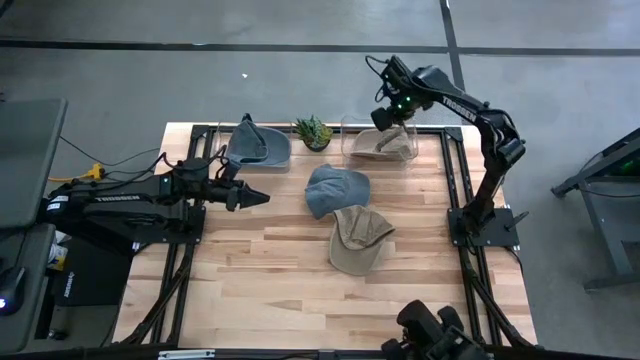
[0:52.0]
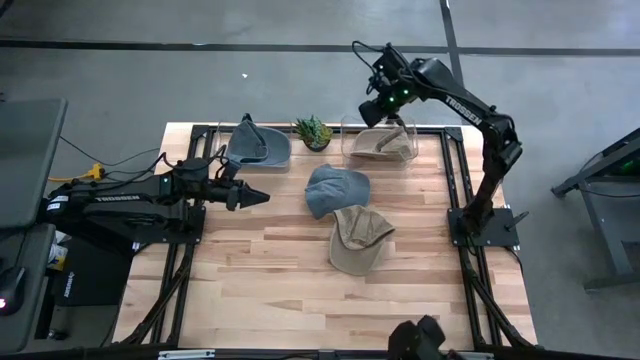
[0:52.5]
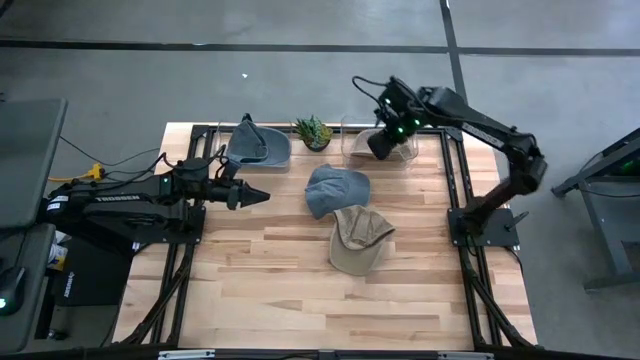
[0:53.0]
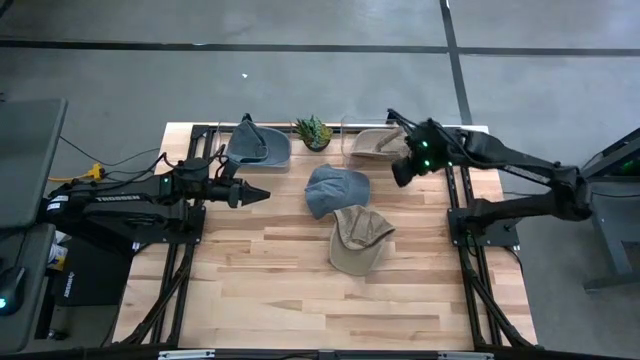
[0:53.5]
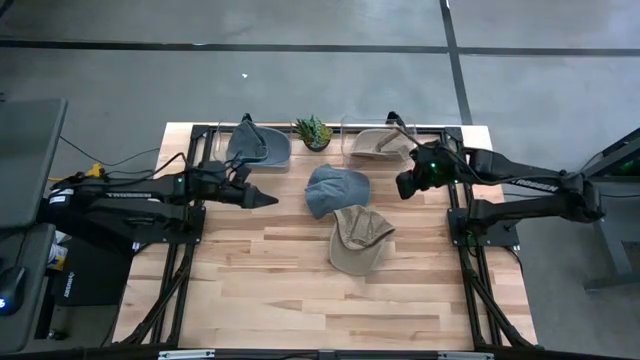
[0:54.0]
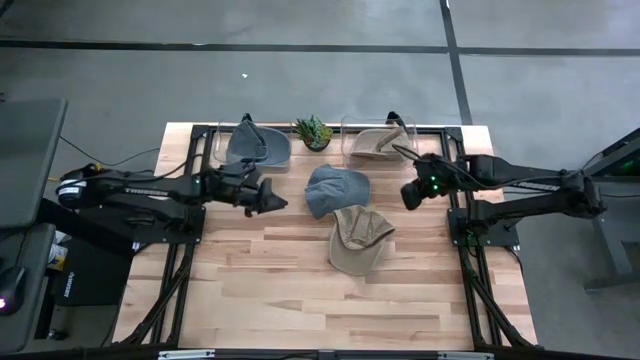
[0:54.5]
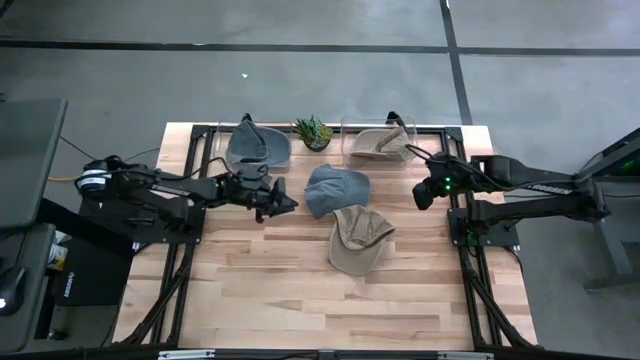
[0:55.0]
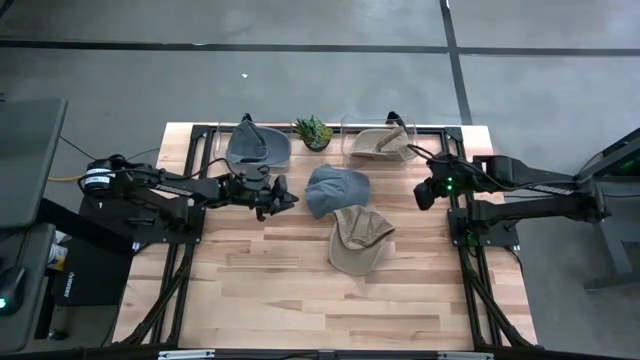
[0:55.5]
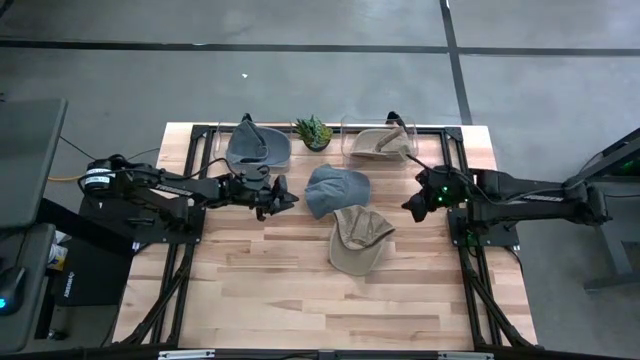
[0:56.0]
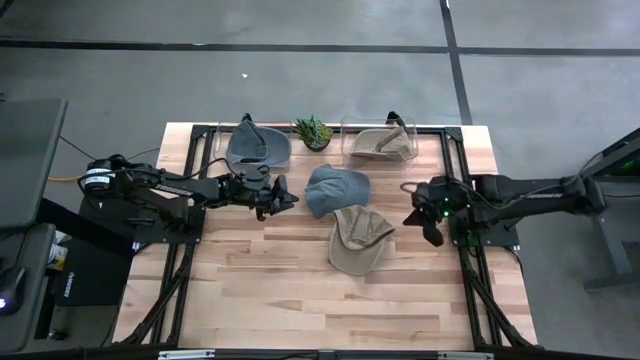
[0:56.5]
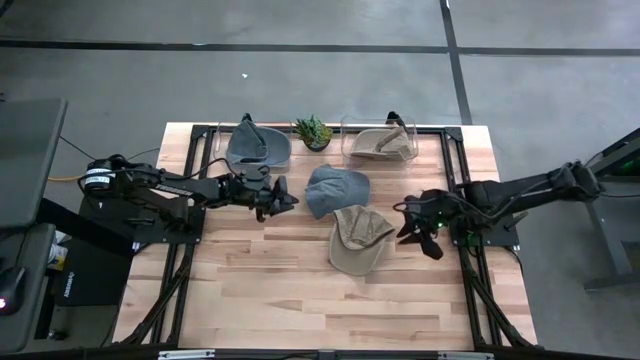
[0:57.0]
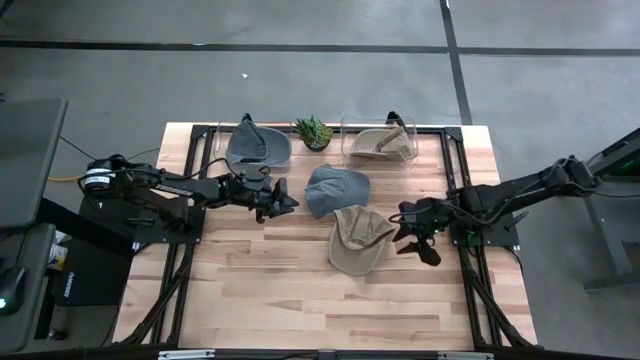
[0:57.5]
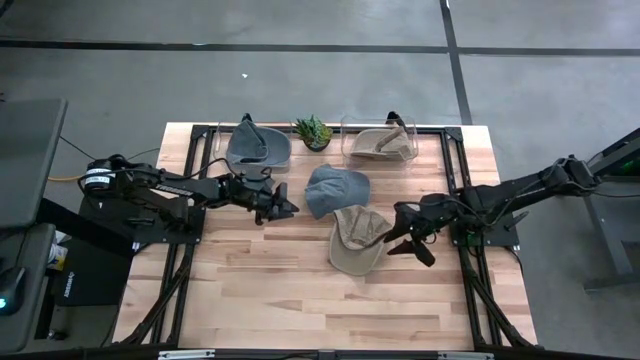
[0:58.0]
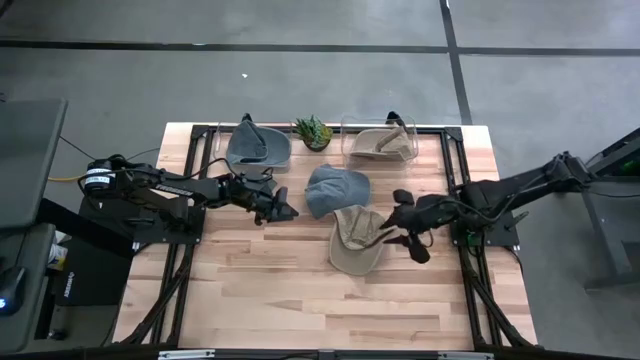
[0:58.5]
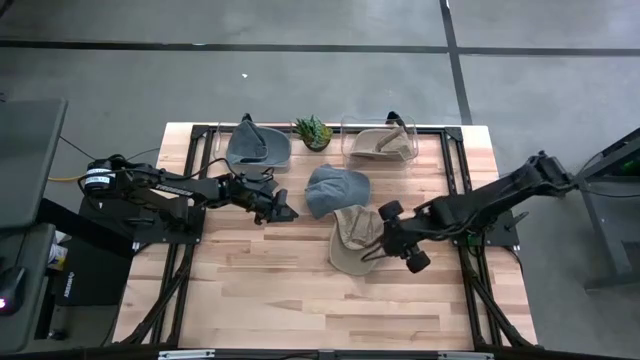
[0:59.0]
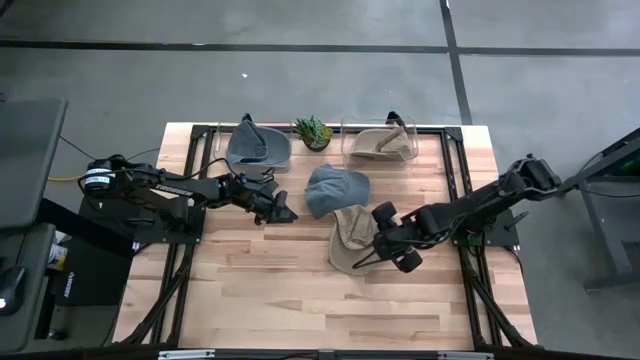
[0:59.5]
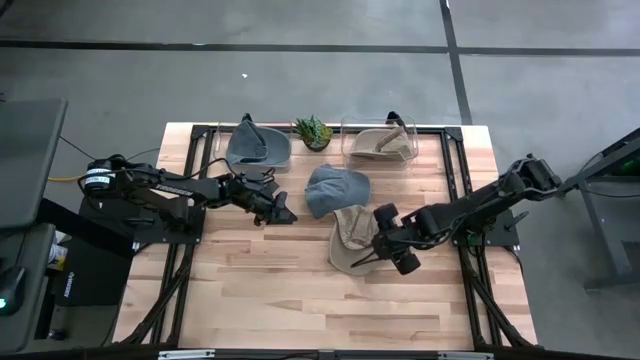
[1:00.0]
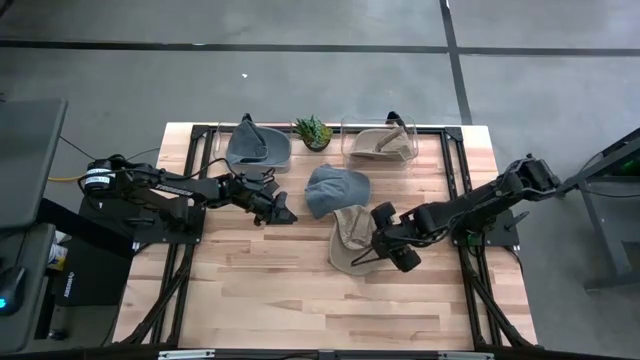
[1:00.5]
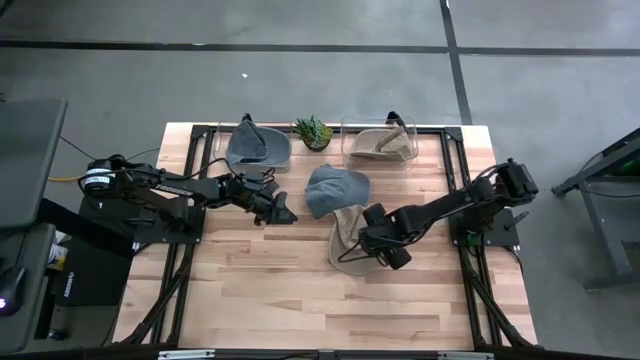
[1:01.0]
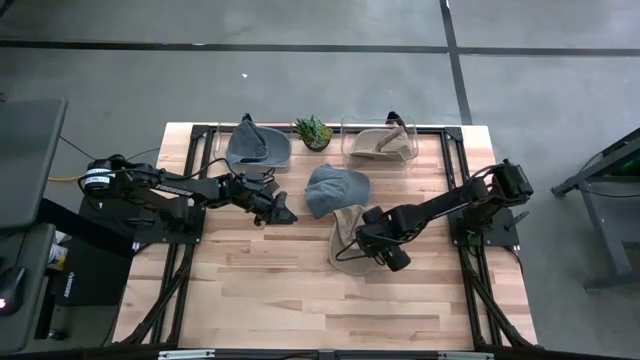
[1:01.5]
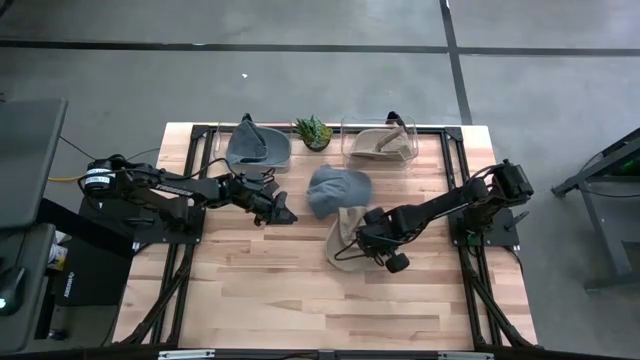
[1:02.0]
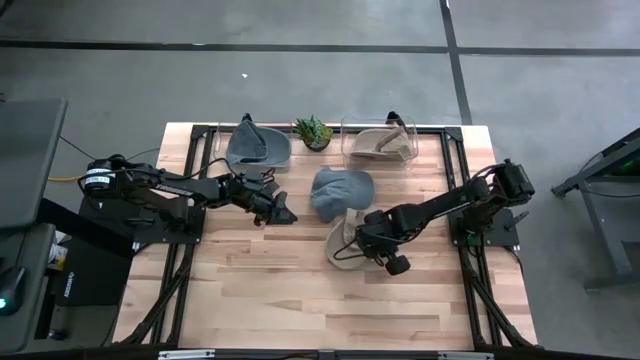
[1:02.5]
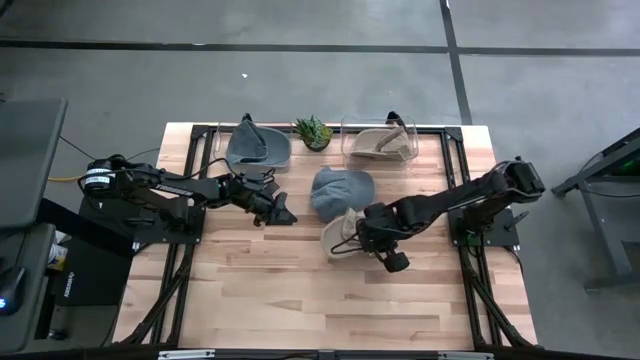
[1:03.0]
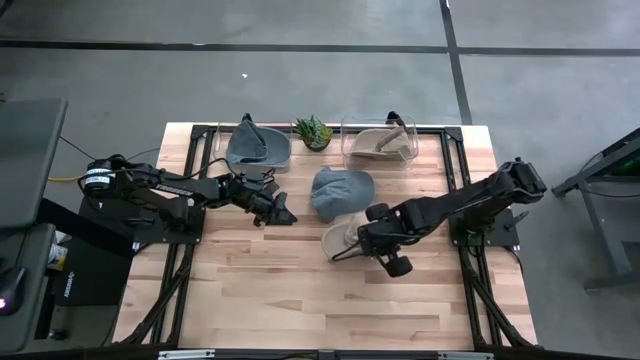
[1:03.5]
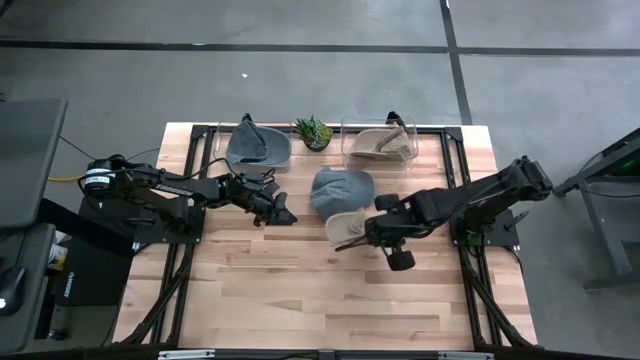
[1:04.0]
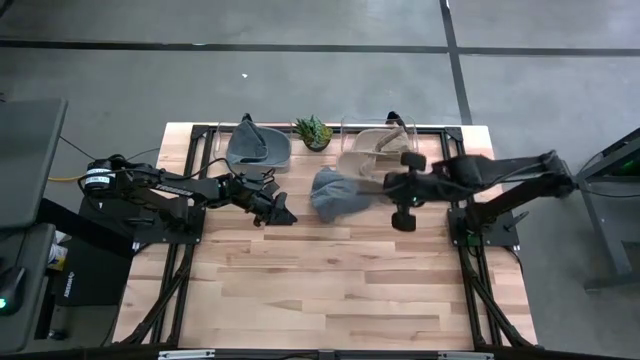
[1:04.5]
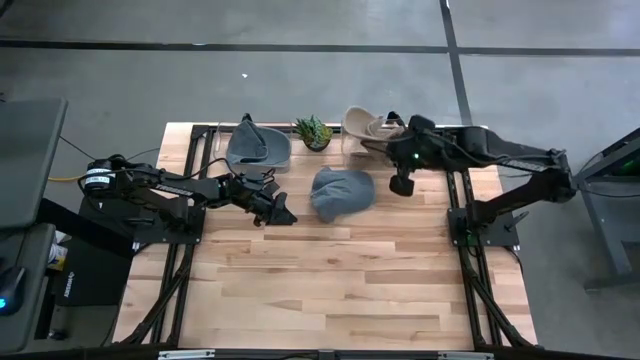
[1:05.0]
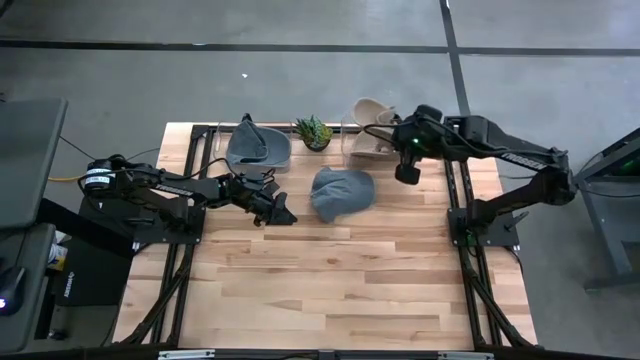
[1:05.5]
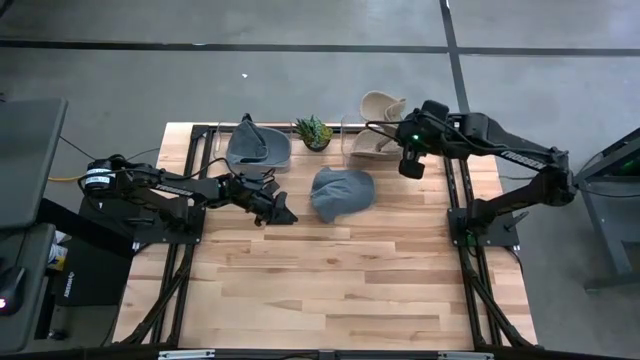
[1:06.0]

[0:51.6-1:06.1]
Task: Pick & Place hat
Put the brown cap into the right transparent bin

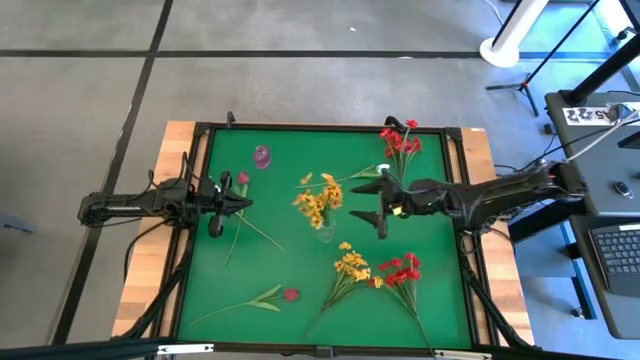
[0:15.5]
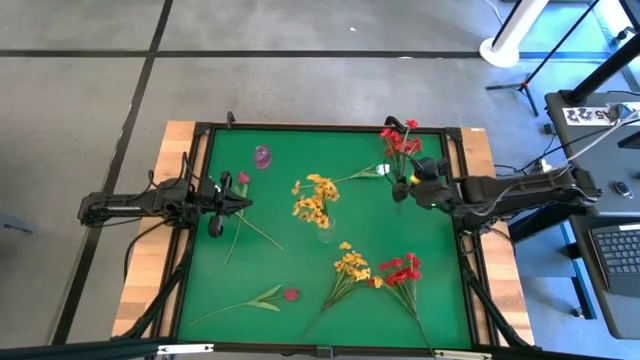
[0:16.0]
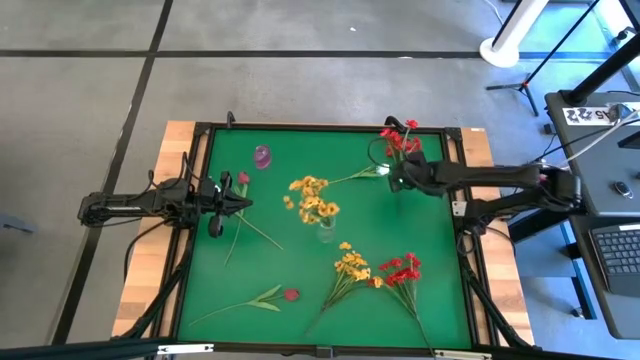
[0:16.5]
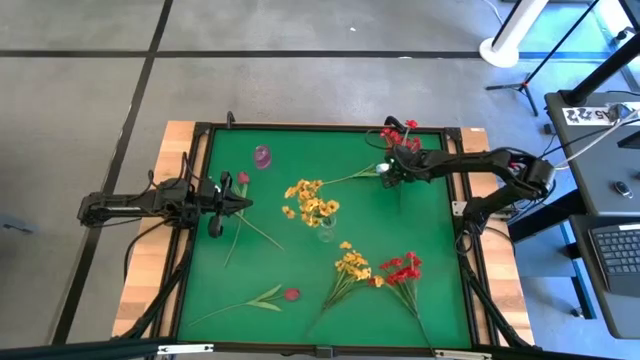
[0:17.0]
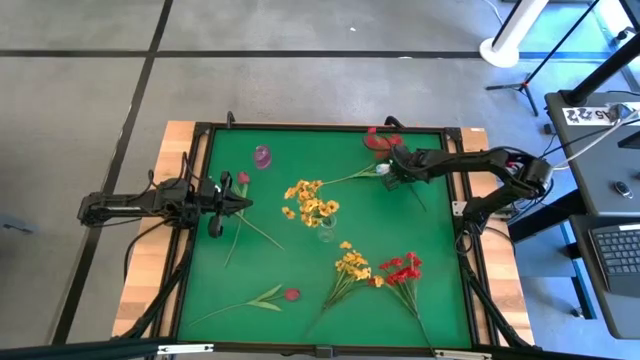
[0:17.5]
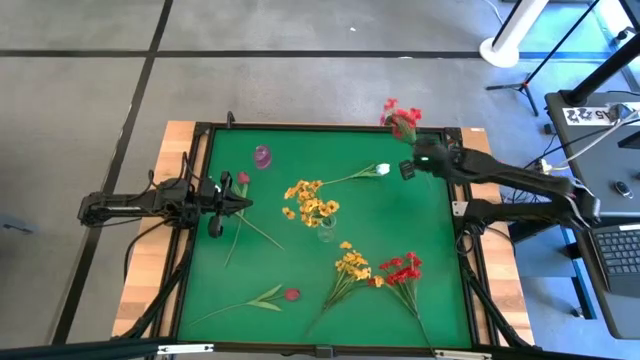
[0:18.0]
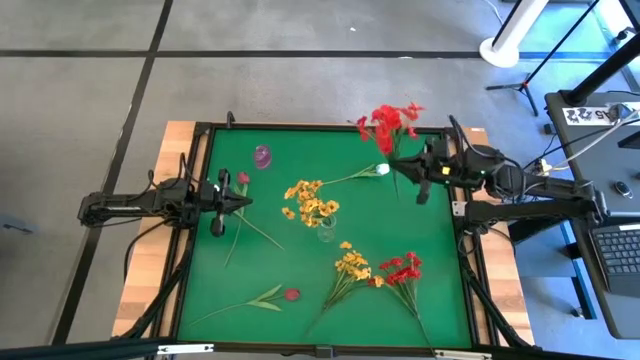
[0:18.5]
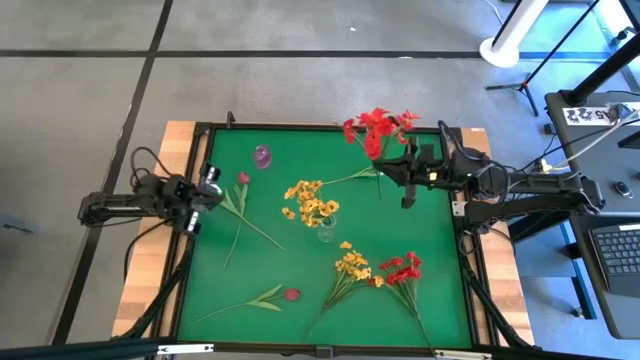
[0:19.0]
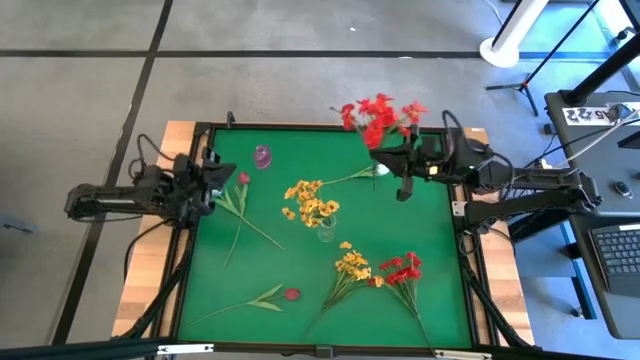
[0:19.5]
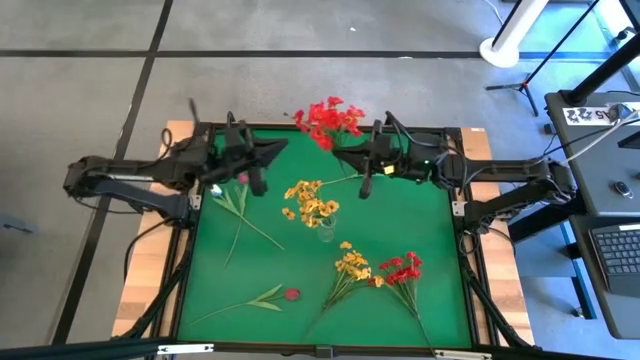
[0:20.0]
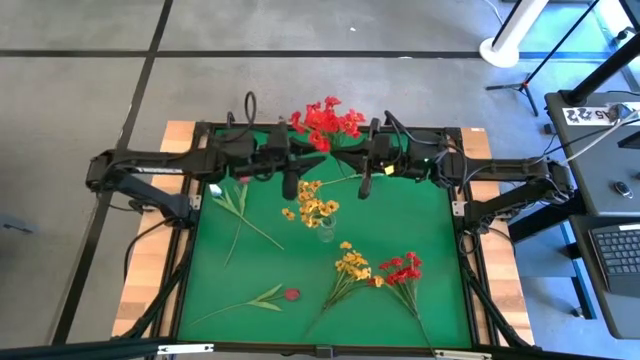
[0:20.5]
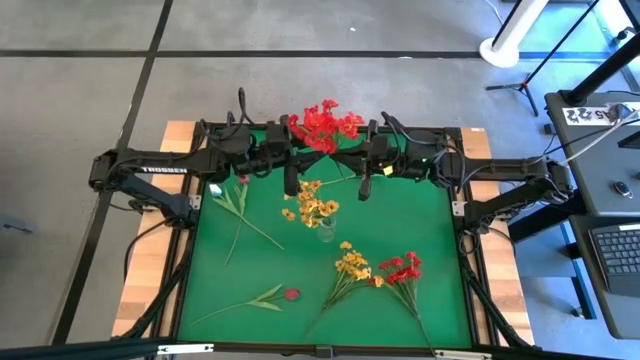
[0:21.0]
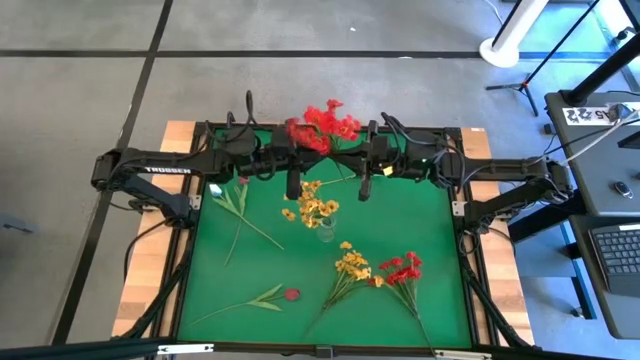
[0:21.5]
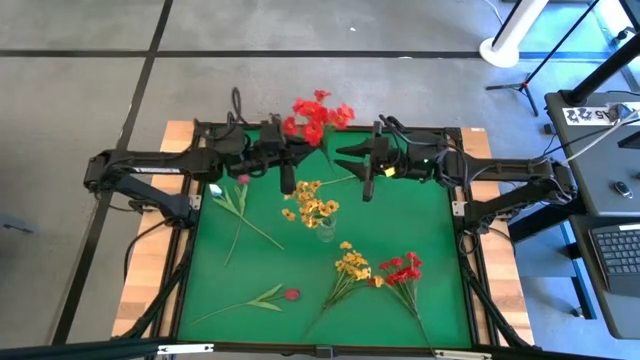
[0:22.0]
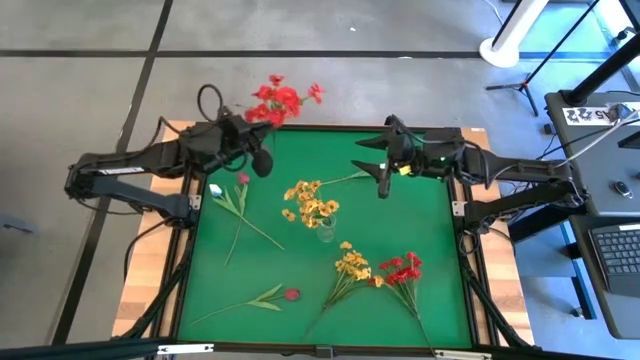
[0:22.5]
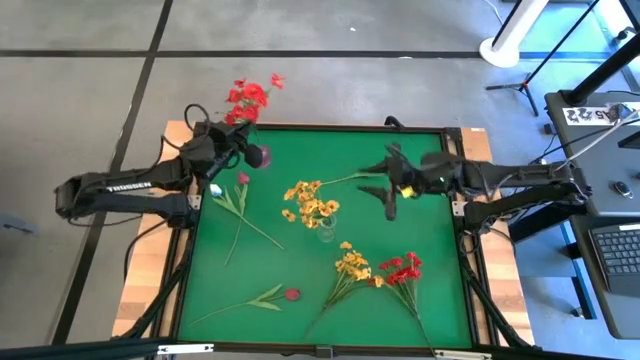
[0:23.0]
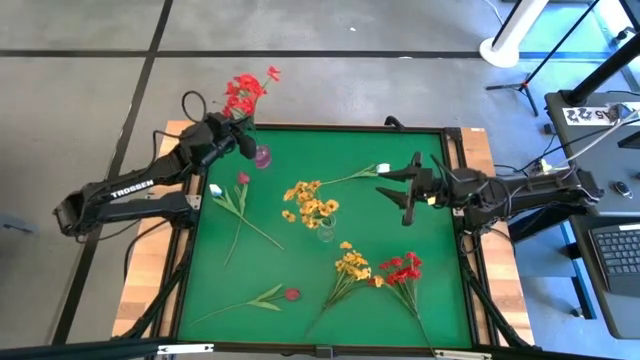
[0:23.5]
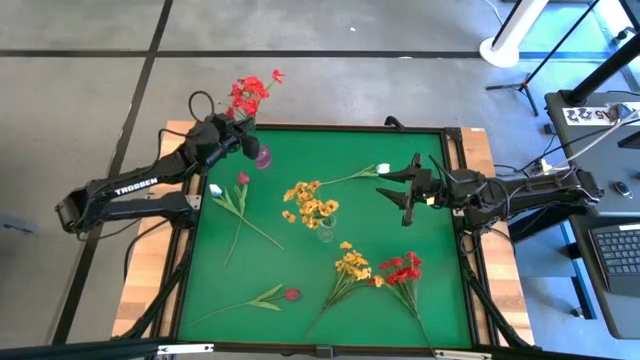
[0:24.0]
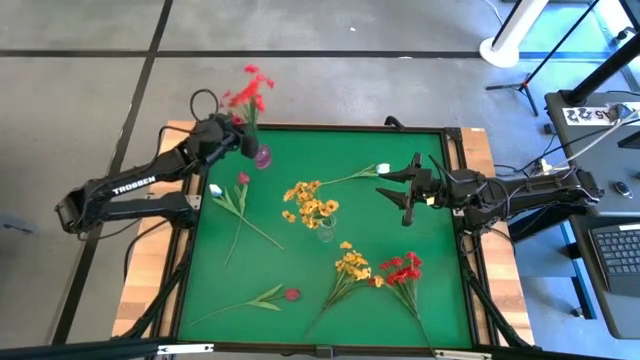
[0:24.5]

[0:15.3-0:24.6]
Task: Sort flowers into vase by color
Put the top red flower into the violet vase
